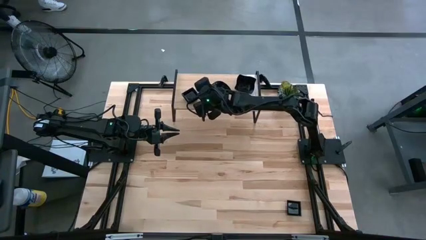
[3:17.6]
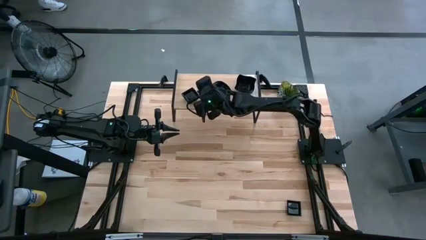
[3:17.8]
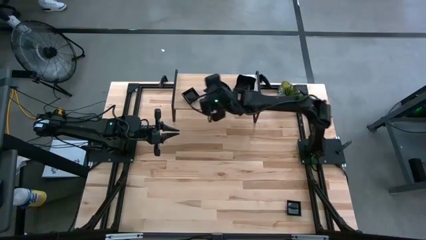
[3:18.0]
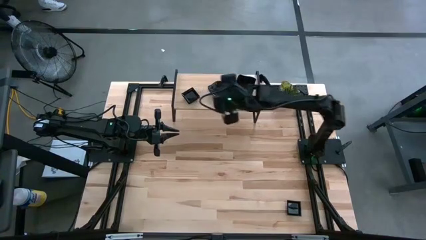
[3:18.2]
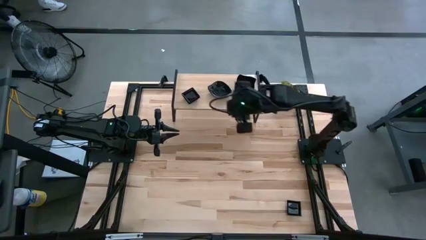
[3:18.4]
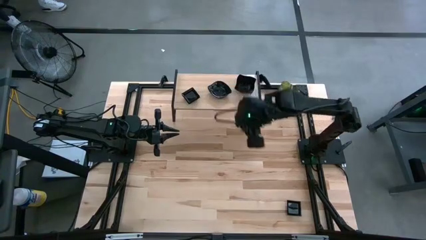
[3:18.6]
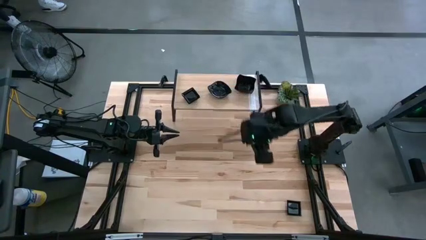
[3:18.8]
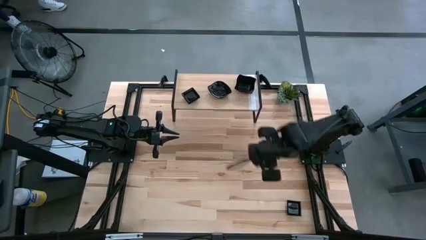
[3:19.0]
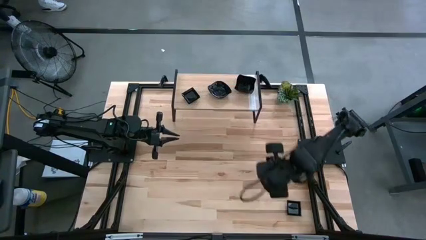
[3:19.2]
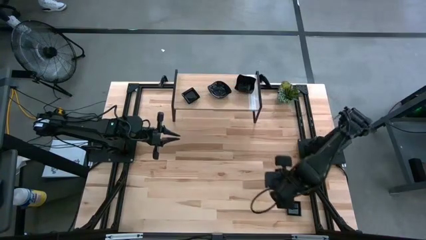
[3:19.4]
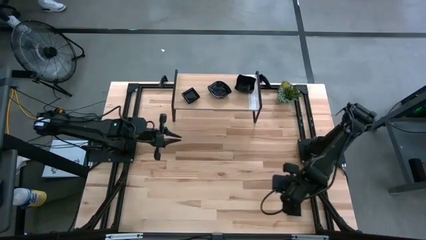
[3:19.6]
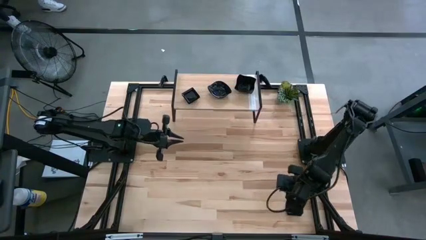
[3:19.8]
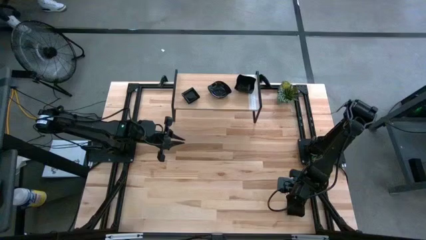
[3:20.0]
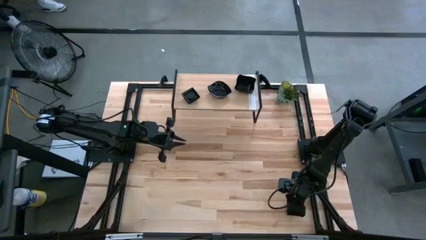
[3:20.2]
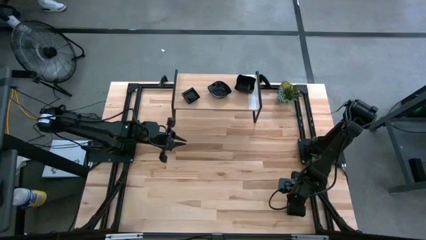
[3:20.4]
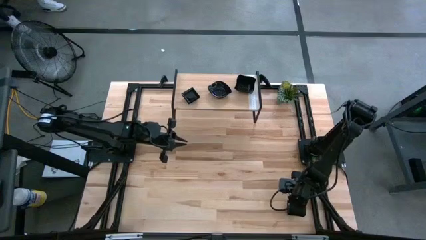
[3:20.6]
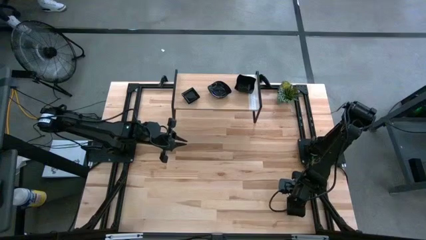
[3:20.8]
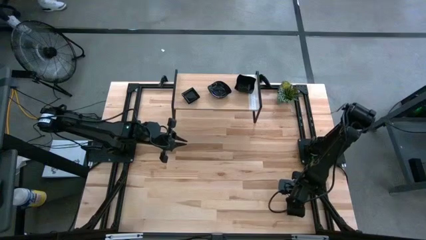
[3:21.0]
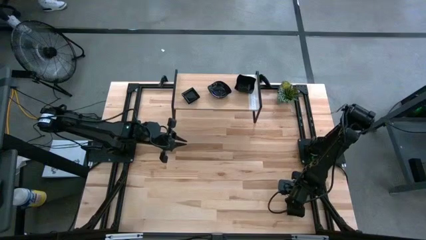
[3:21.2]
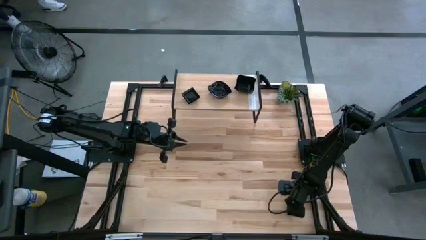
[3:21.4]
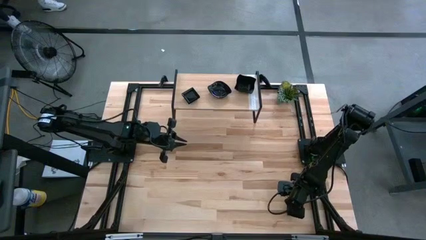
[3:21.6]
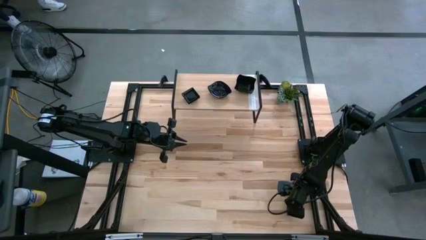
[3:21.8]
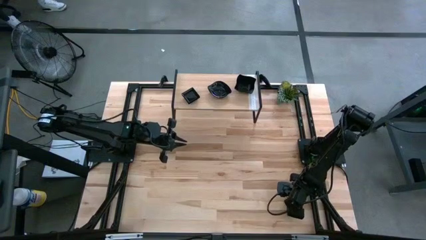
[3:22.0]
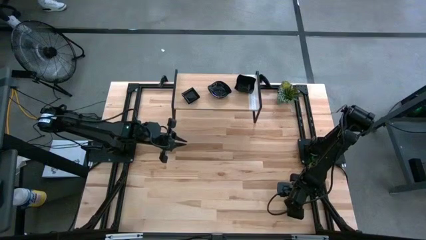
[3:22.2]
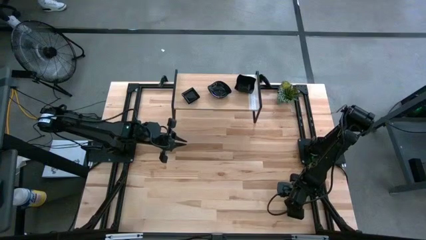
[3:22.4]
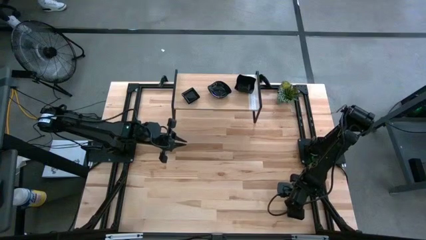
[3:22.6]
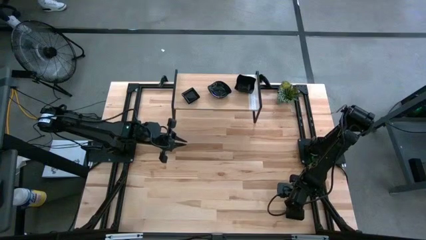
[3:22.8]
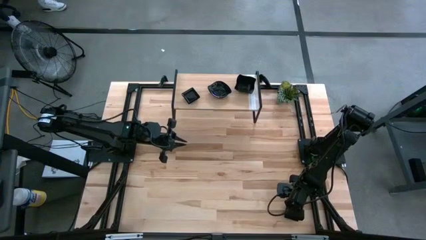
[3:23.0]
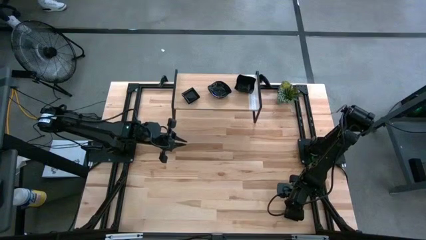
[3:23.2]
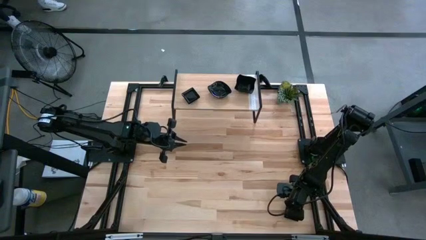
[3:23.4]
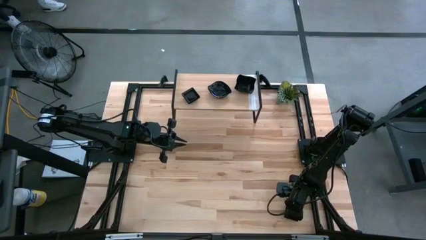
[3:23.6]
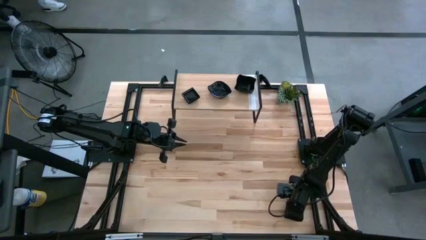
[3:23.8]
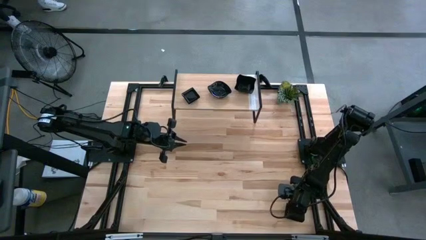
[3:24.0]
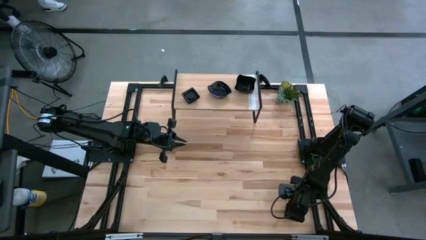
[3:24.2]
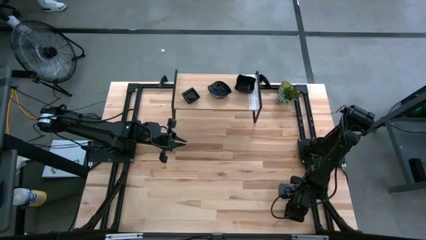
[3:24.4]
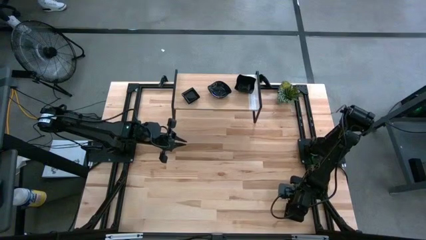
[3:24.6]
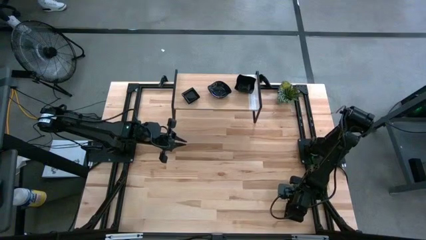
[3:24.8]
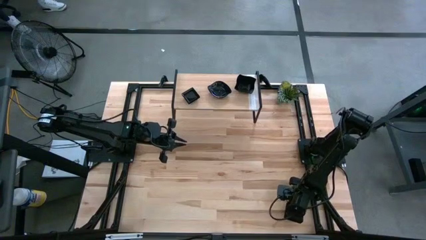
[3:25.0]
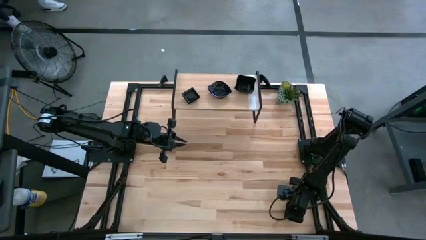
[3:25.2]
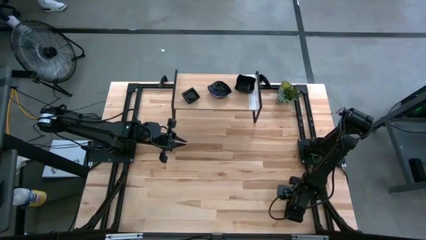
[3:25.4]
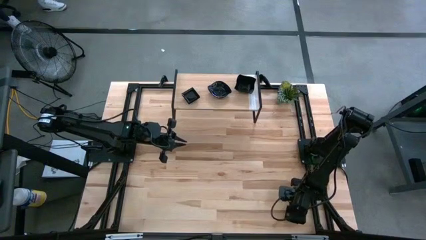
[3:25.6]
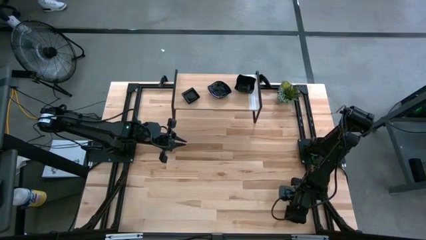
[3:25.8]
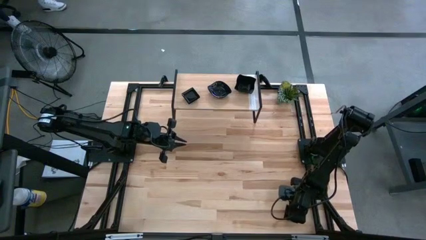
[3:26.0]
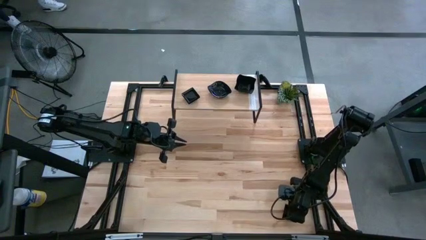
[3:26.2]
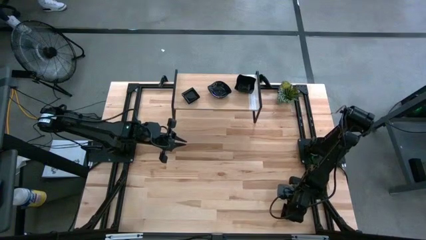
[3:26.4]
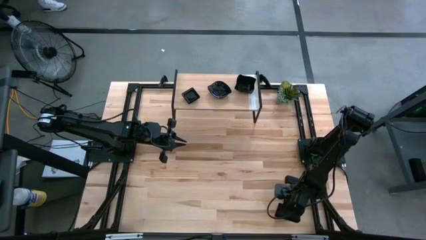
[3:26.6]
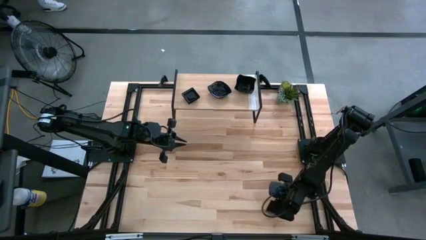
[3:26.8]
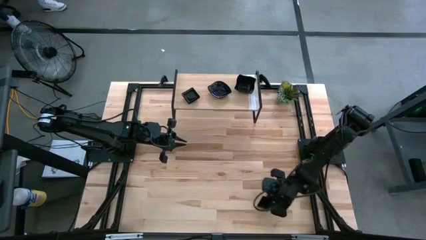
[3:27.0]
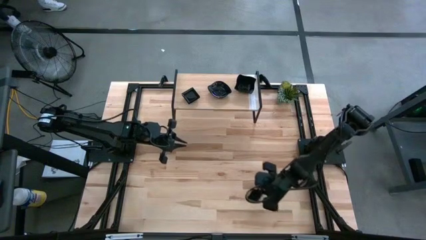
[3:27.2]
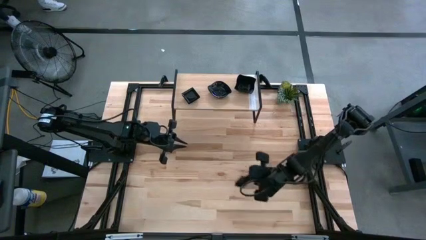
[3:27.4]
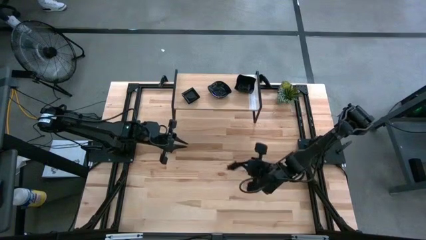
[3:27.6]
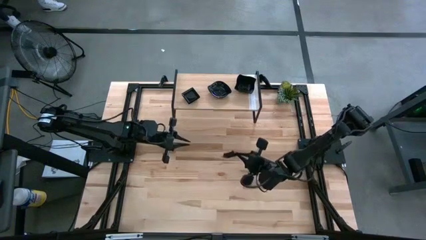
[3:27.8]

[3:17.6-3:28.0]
Task: Pick & Place Mini shaped plates
Stack the square plate on top of the other square plates on the shelf

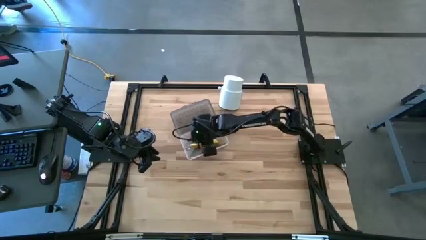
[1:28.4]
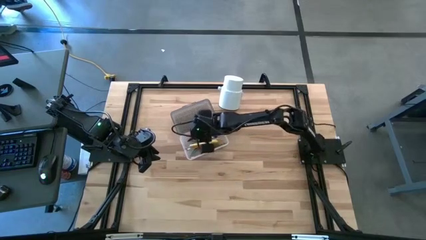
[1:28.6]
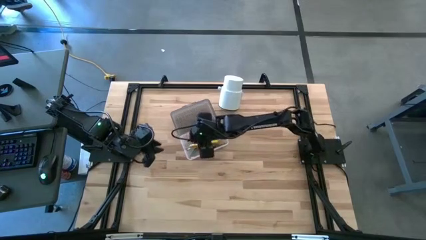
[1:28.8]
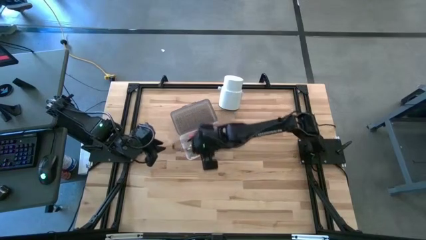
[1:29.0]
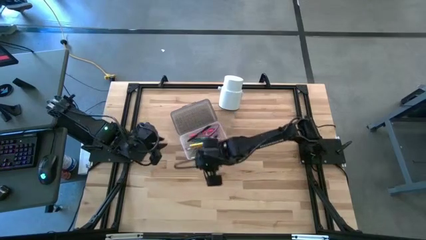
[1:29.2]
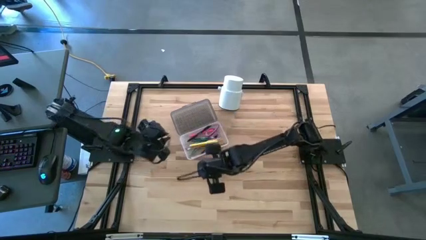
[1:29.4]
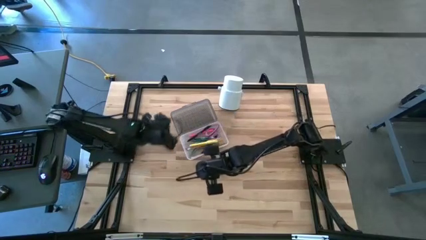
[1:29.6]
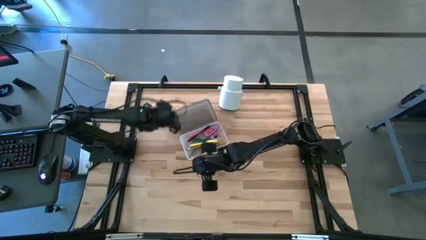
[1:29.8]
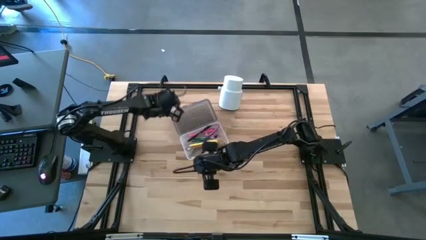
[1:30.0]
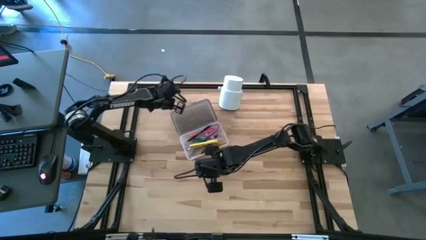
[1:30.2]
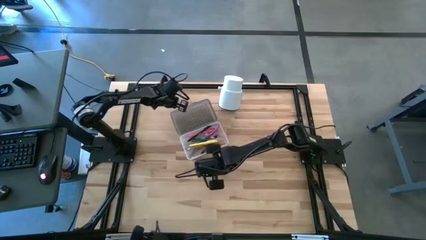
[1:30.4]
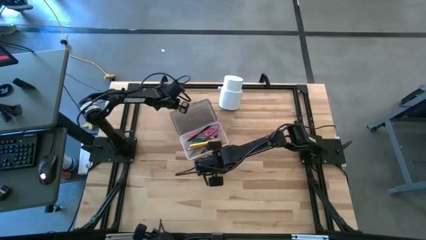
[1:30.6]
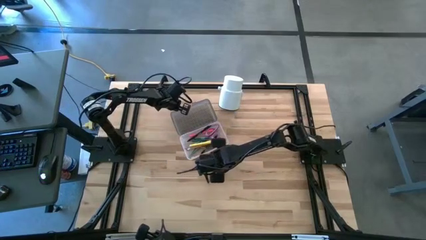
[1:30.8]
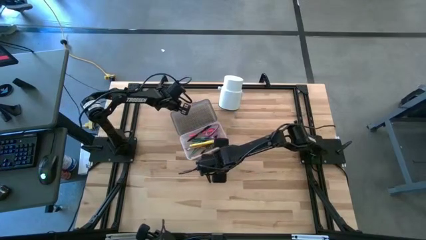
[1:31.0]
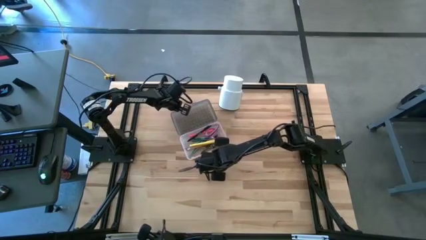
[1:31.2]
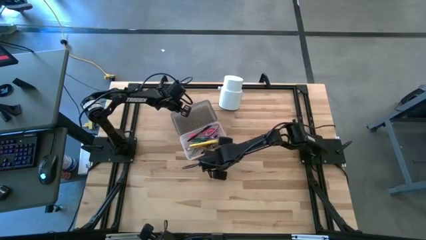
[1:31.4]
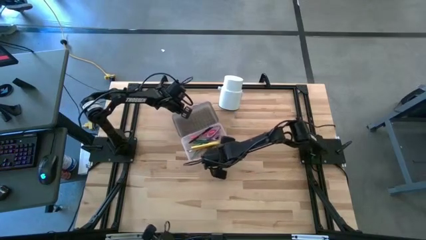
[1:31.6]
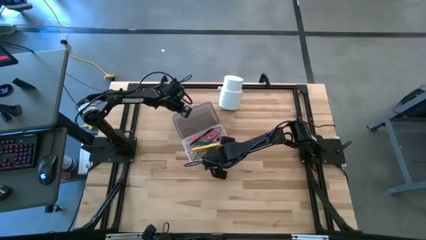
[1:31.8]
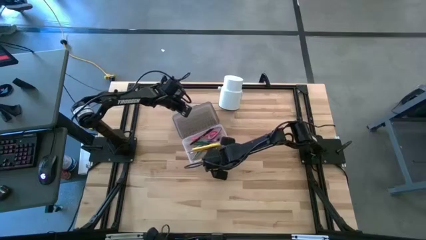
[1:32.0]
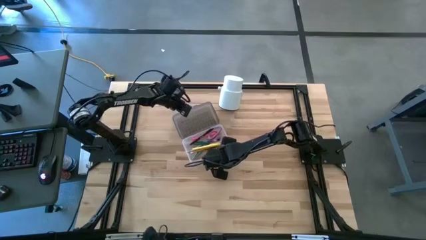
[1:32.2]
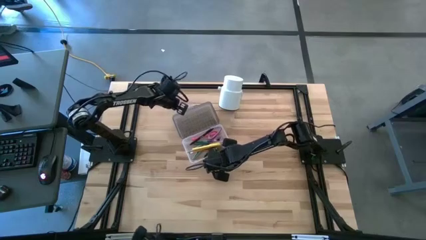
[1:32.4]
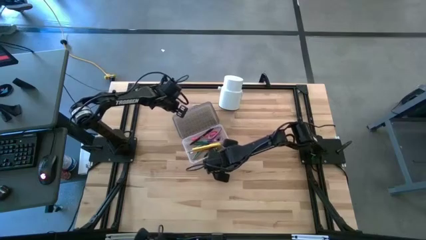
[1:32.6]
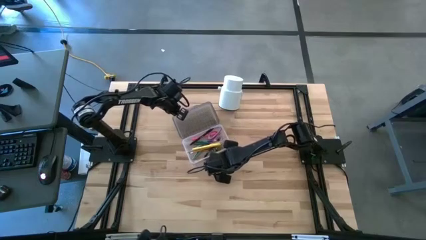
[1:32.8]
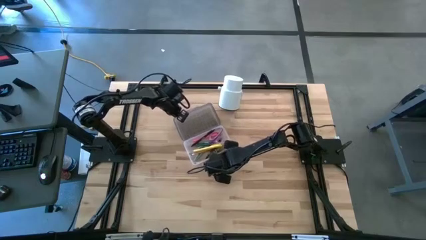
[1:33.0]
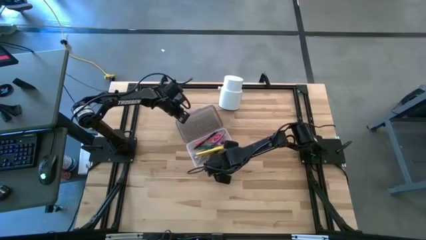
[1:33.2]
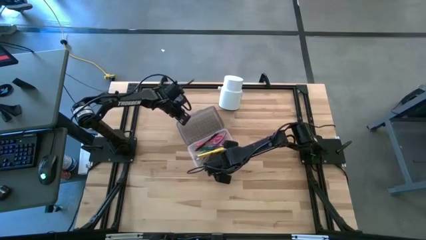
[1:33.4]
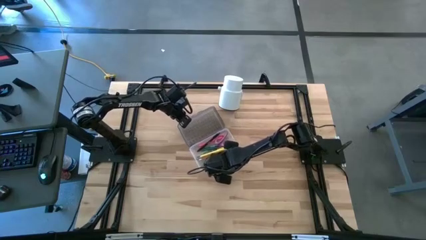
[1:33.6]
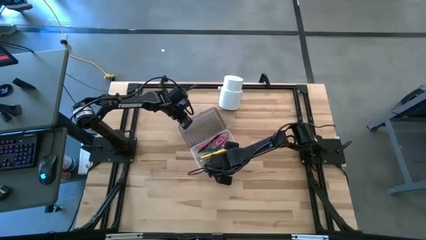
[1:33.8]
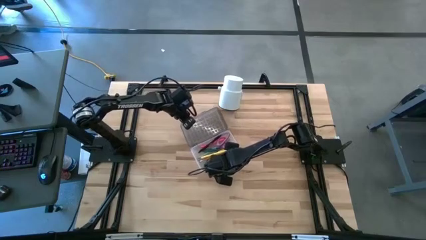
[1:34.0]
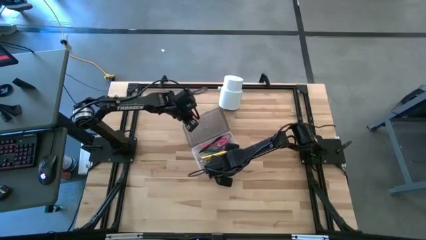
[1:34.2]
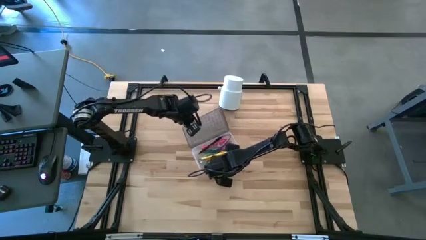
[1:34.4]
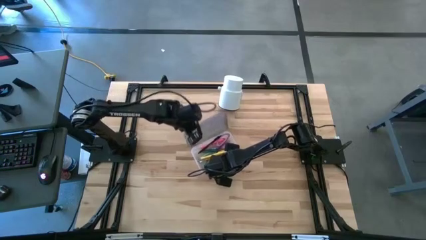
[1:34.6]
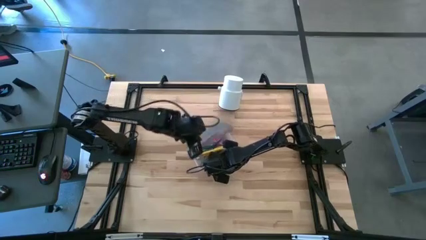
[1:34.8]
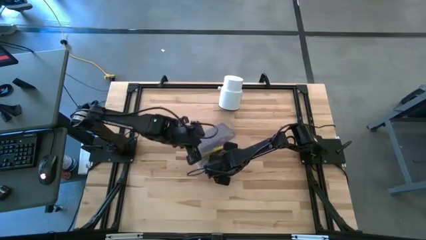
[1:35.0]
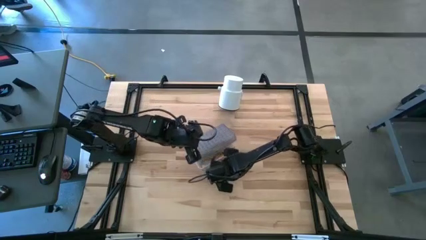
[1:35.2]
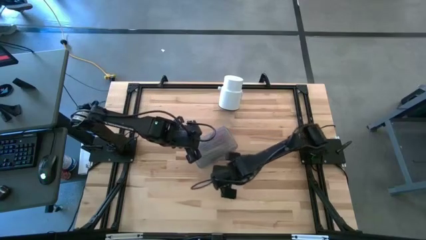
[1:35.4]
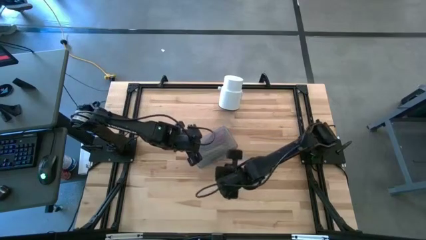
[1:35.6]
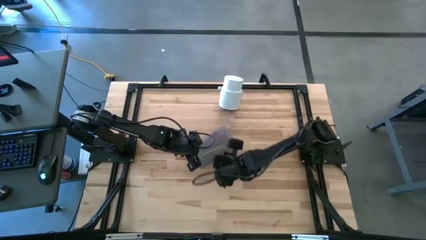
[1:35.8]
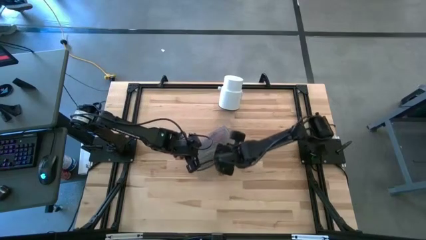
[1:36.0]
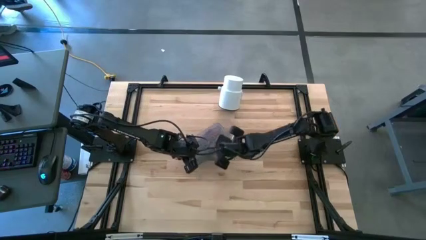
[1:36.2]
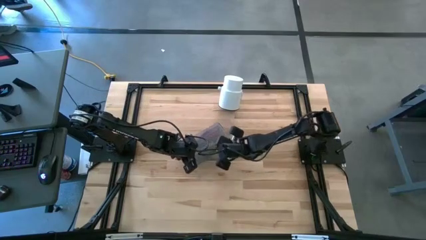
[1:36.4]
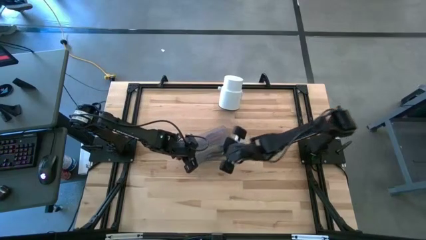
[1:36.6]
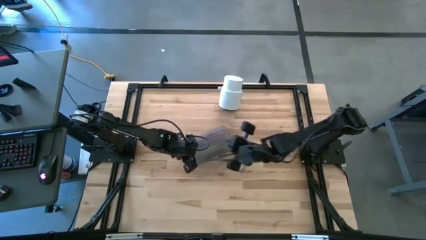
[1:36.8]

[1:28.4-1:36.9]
Task: Pick & place school supplies into a supply box
Close the black supply box
